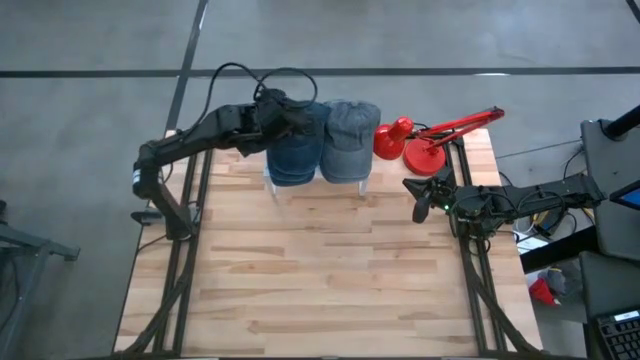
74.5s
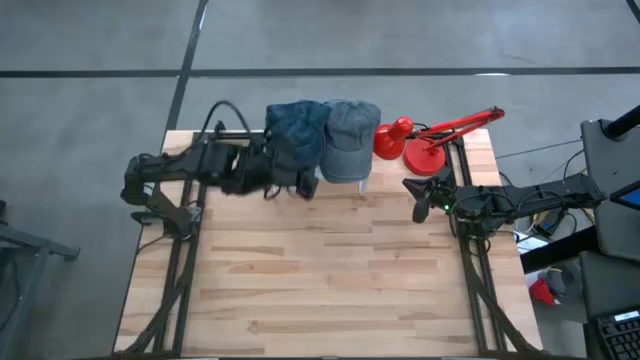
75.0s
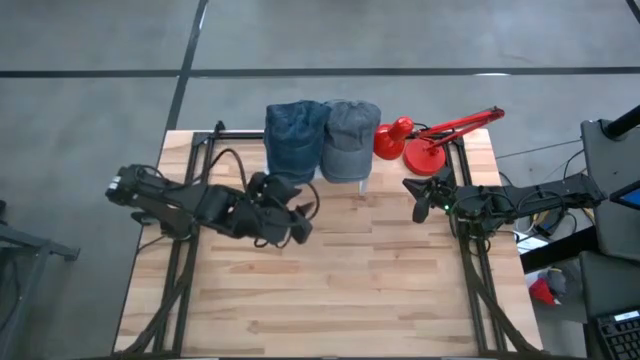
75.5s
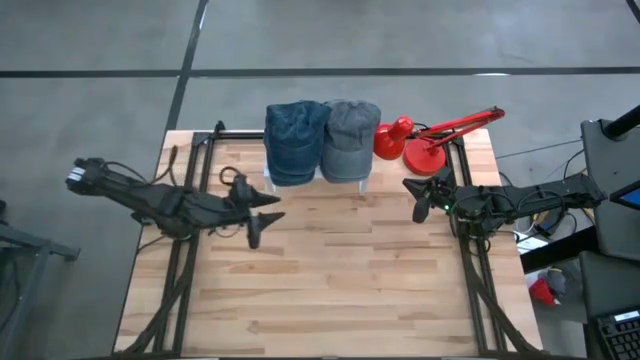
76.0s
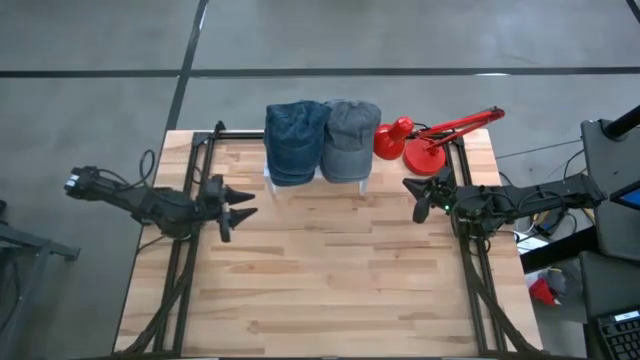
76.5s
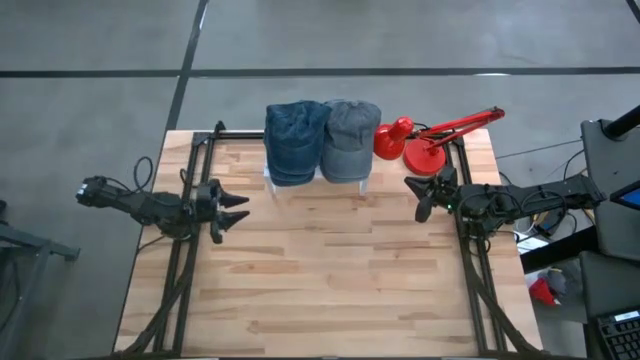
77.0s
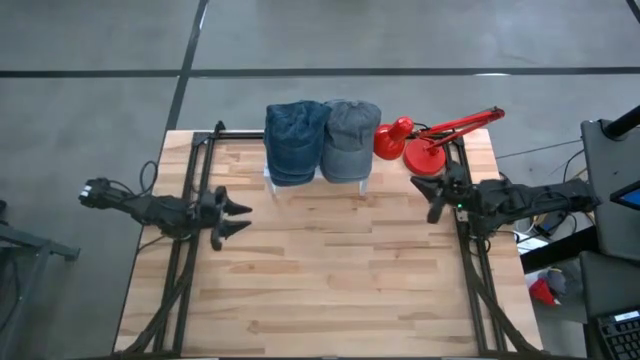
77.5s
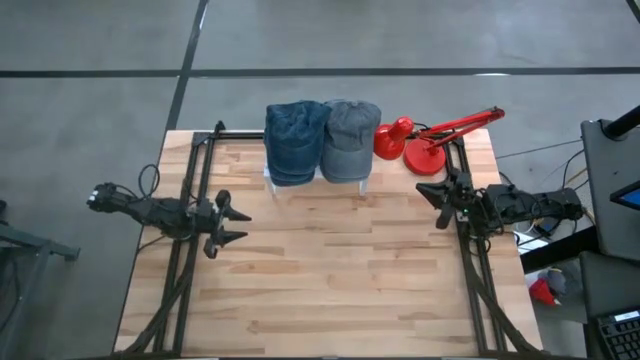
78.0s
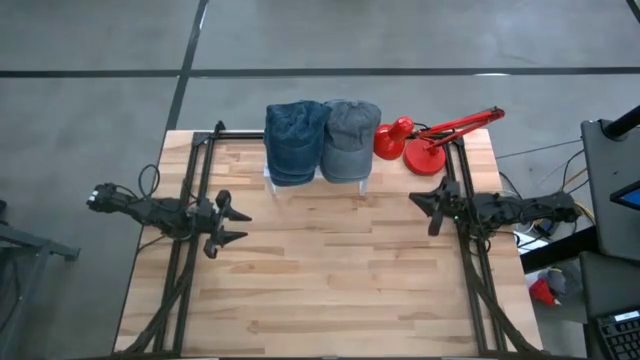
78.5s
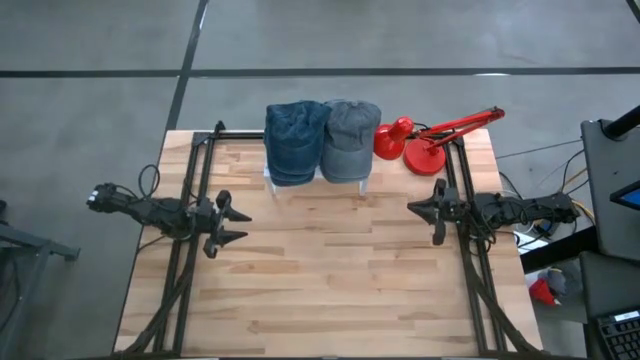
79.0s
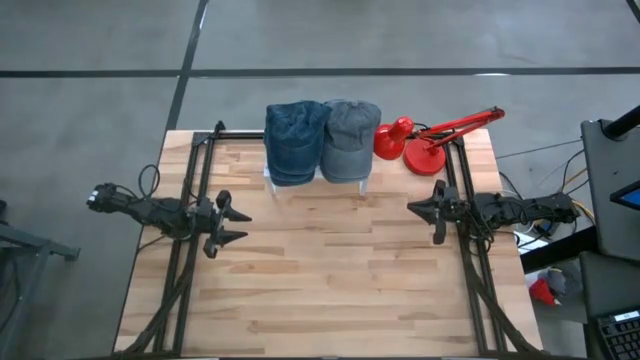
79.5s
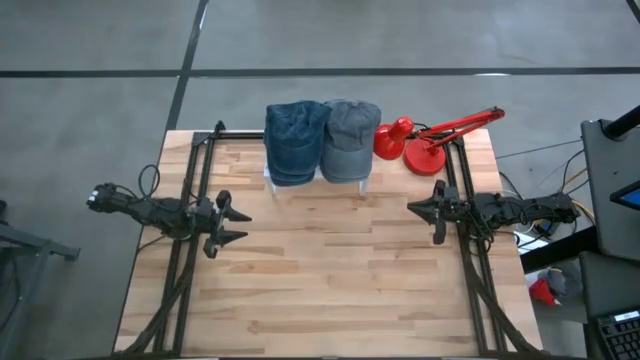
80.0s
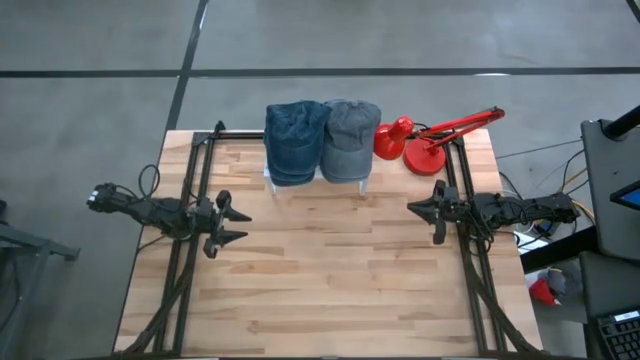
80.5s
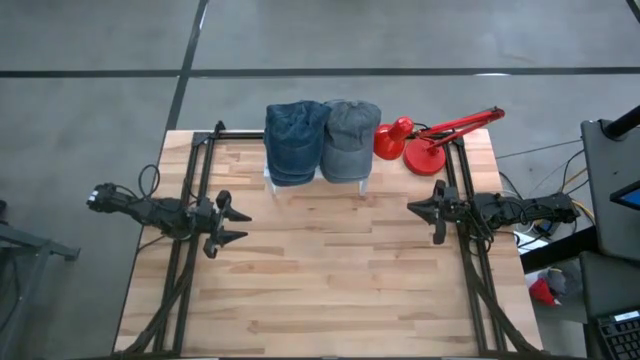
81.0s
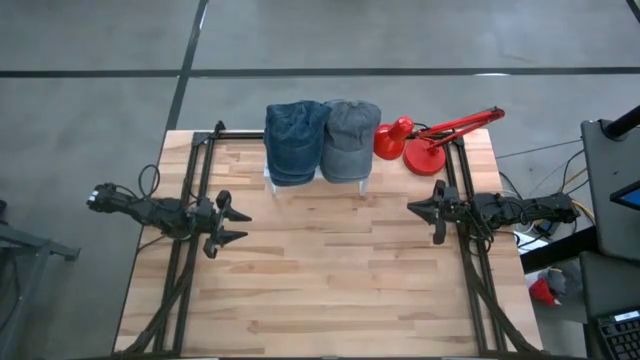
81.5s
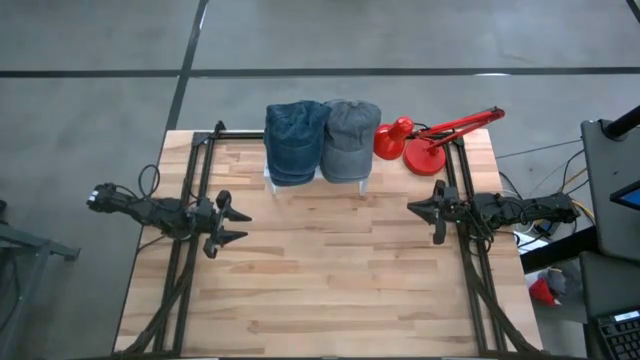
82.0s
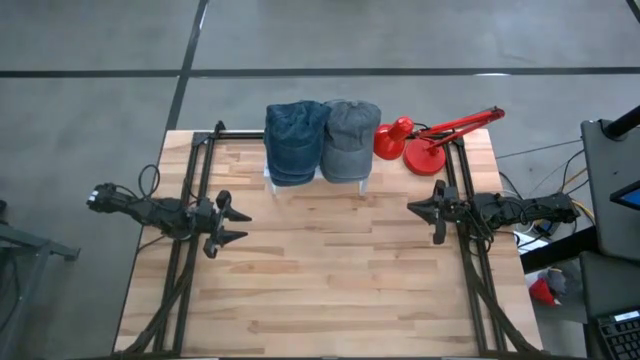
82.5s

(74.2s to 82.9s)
Task: Stack small to large cups/mugs on shelf
Return to Home Position

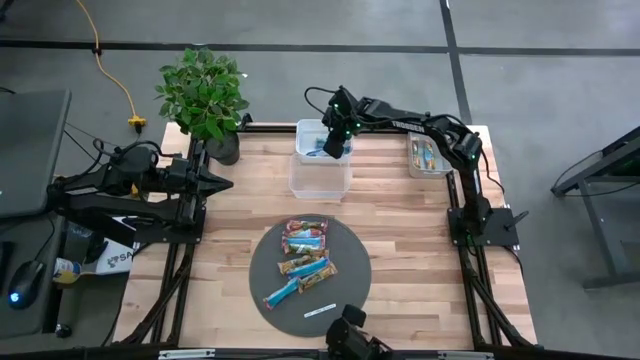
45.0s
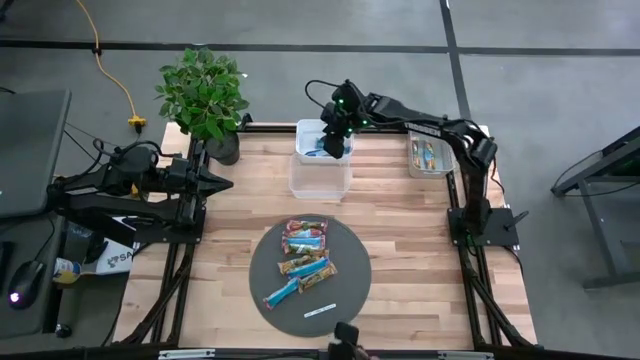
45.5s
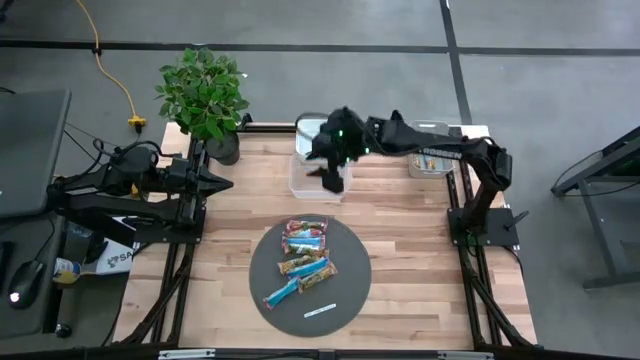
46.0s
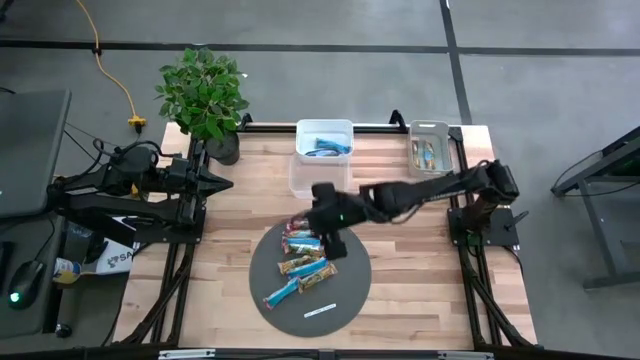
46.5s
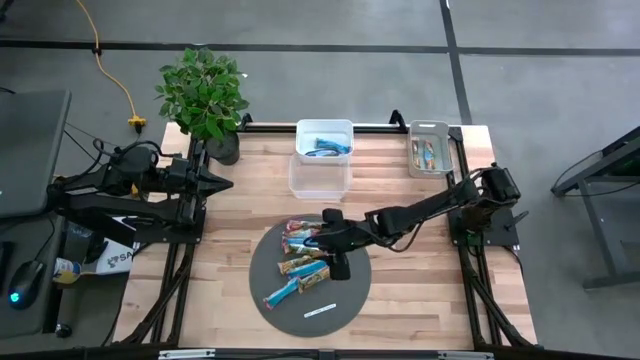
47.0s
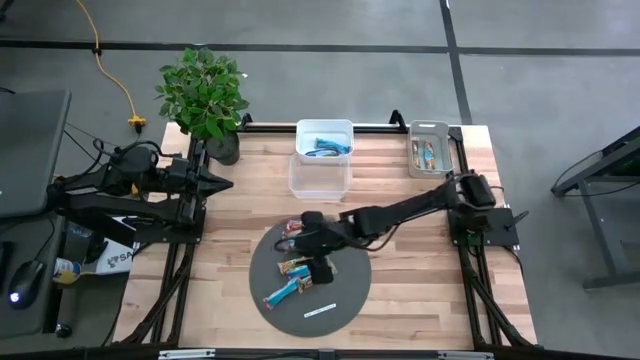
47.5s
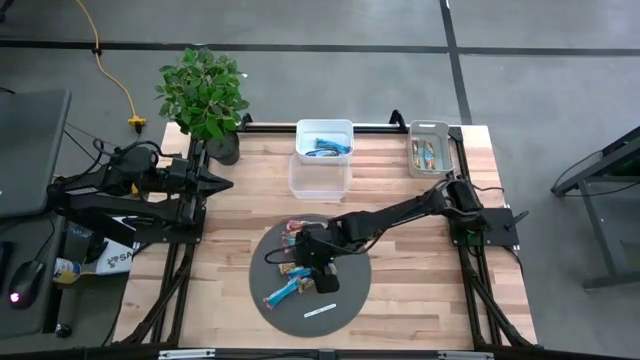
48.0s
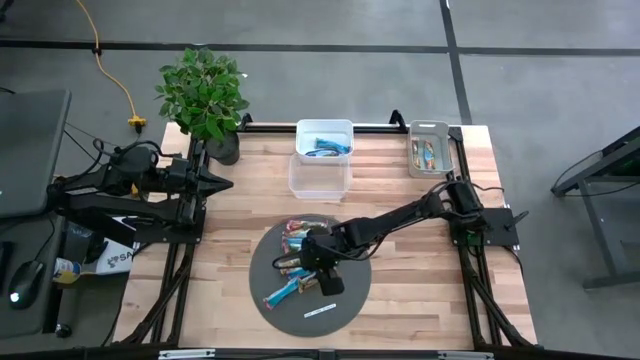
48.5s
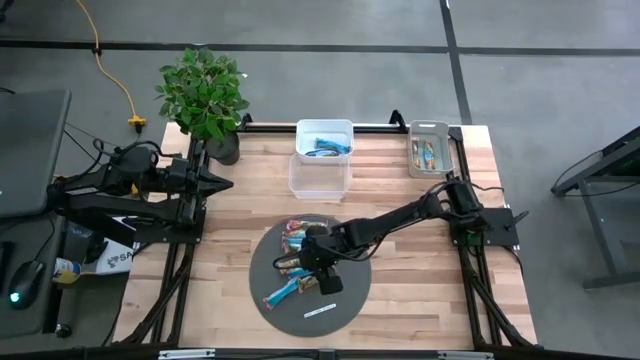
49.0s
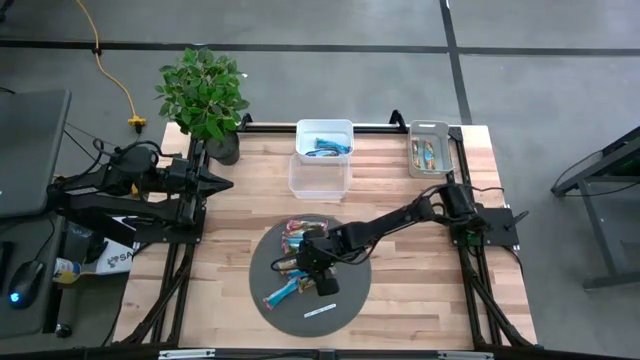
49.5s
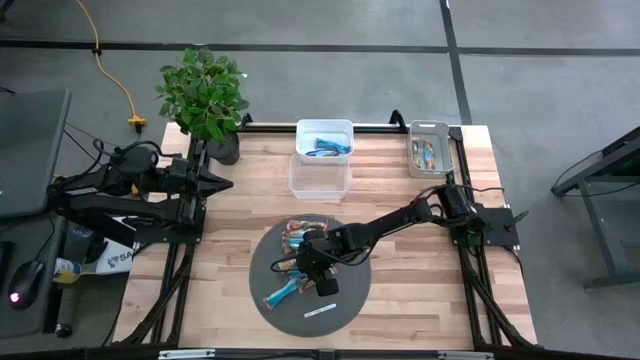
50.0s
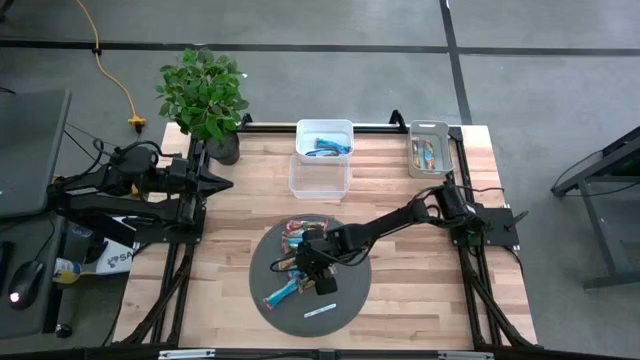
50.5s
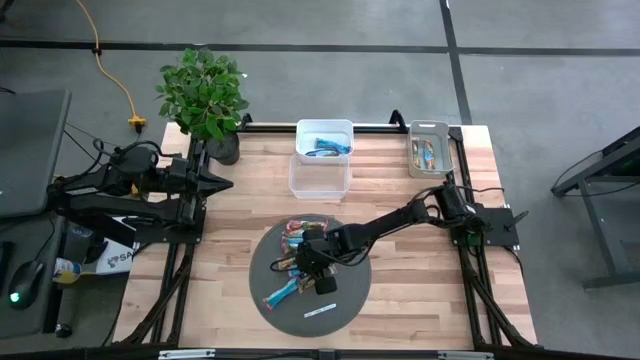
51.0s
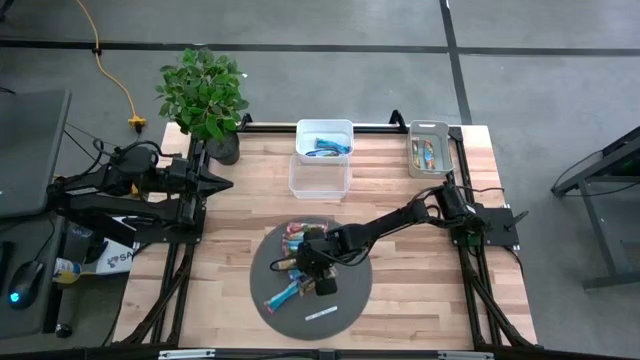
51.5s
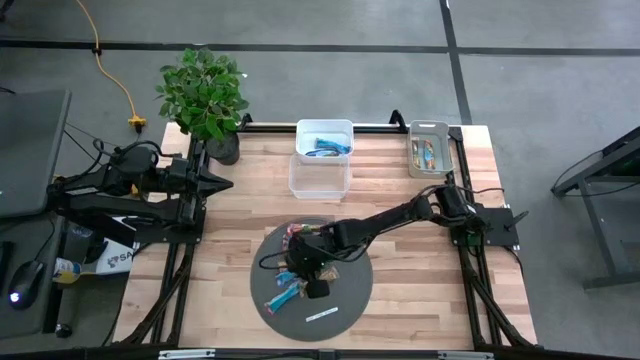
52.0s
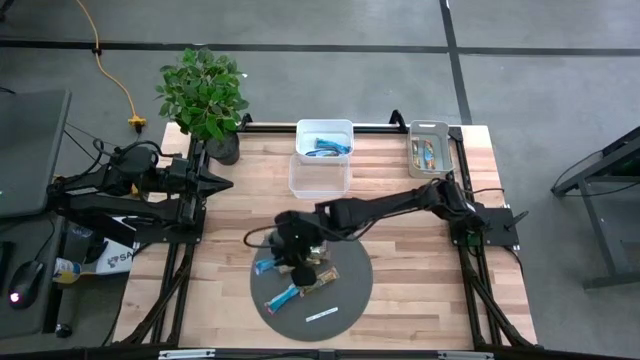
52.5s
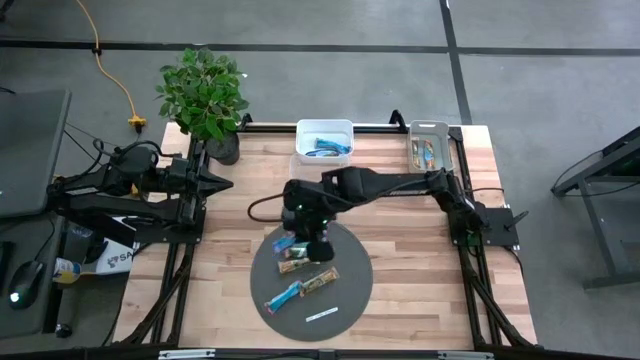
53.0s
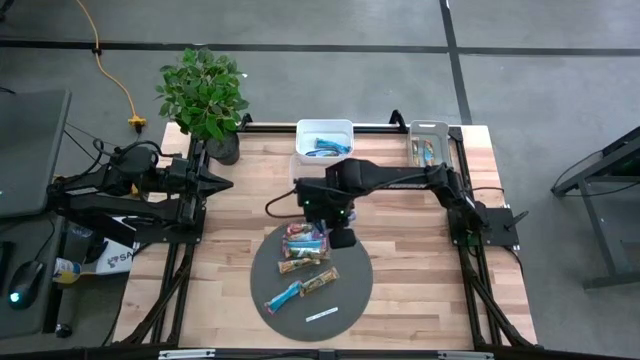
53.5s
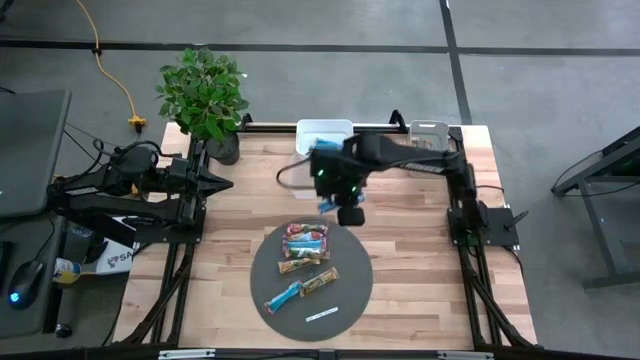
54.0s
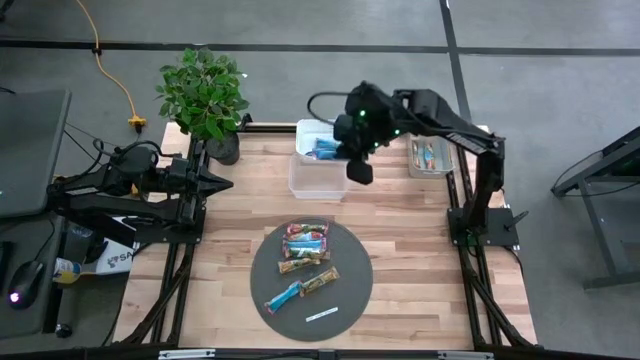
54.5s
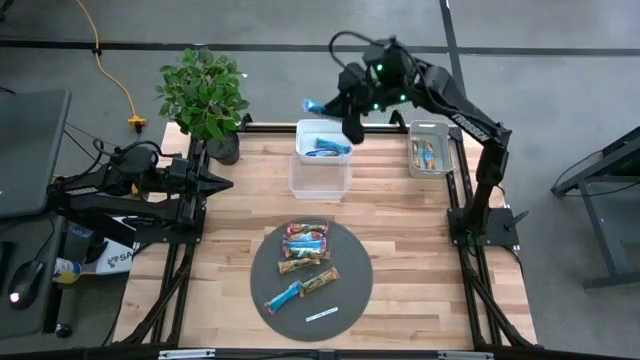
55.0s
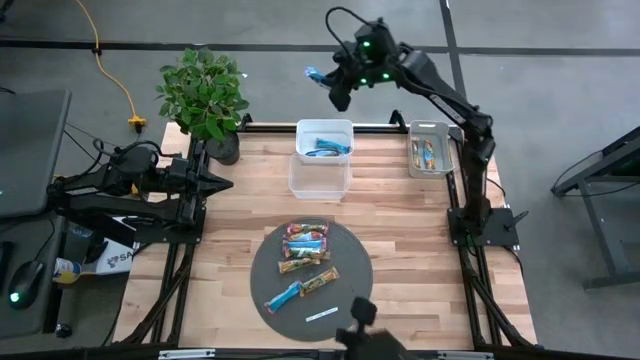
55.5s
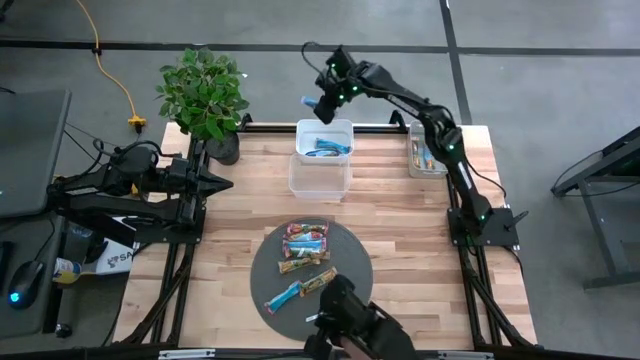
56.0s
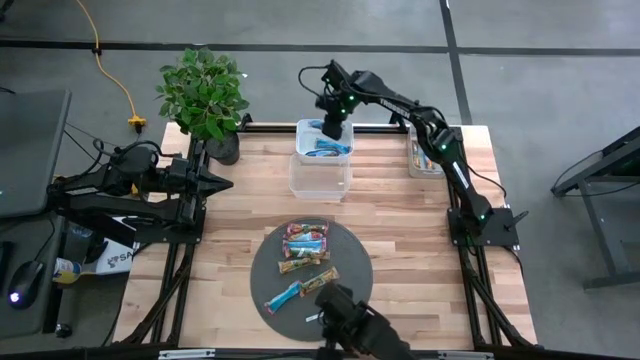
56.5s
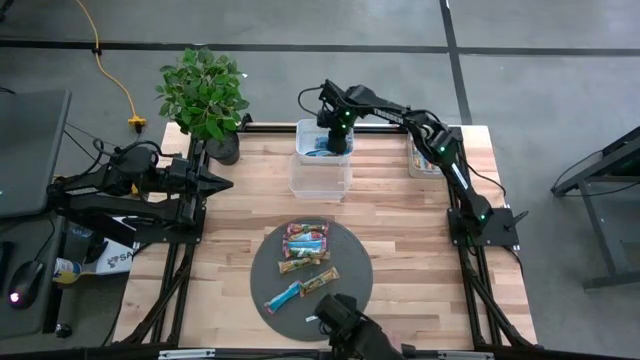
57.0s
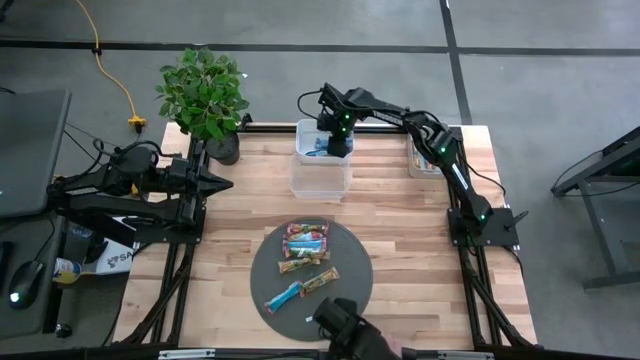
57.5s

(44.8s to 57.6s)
Task: Pick and place Granola Bars by type
Put the blue granola bar into the white bin
